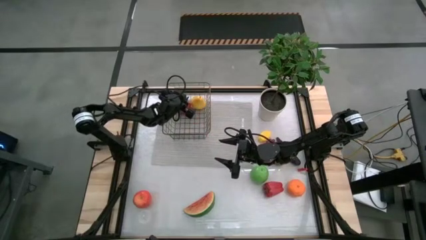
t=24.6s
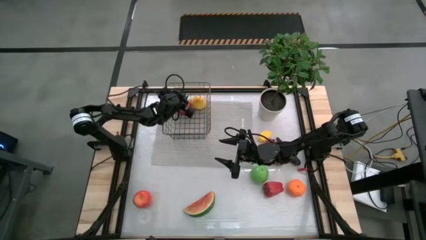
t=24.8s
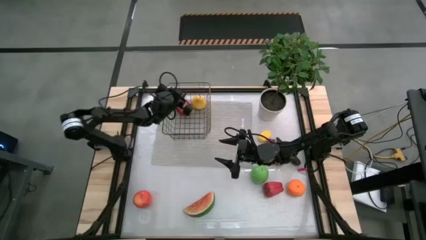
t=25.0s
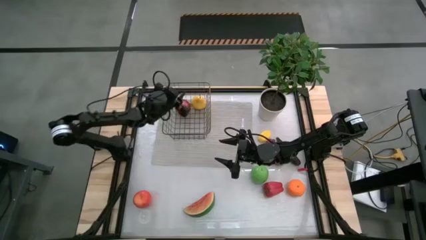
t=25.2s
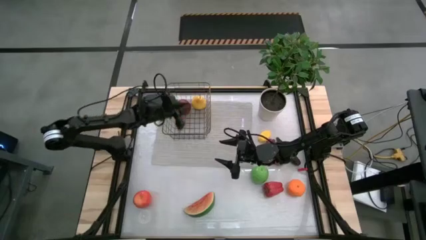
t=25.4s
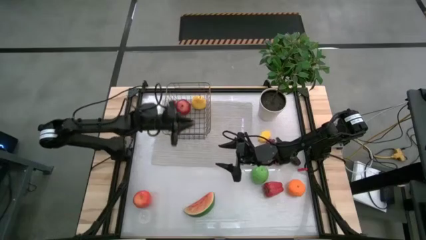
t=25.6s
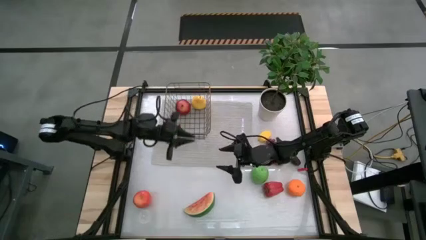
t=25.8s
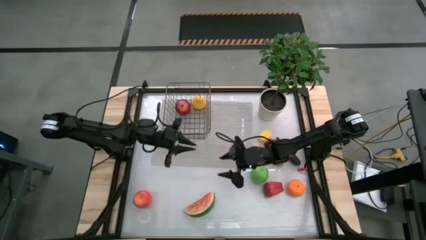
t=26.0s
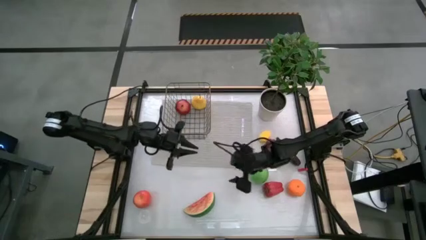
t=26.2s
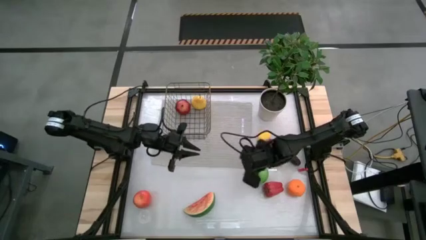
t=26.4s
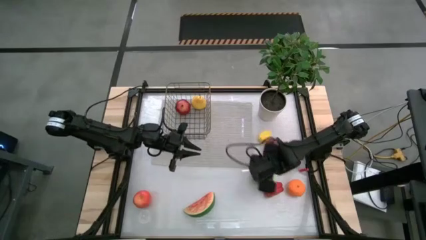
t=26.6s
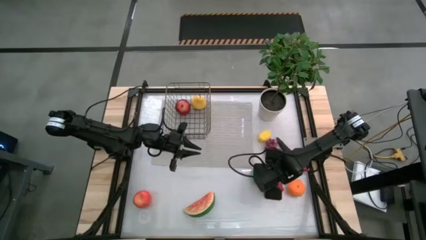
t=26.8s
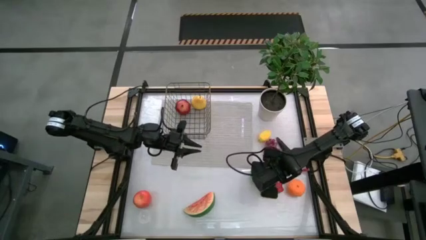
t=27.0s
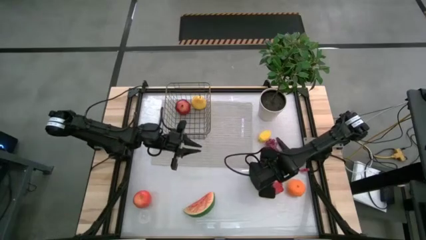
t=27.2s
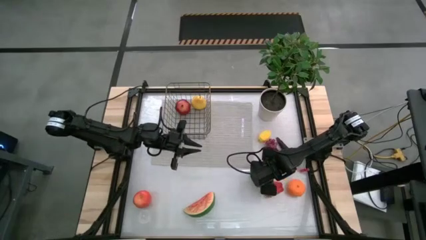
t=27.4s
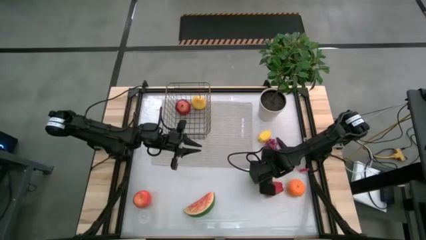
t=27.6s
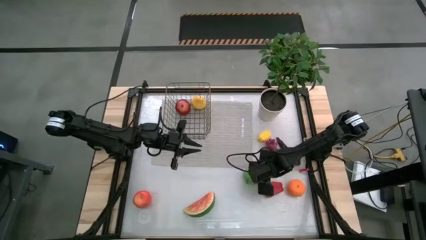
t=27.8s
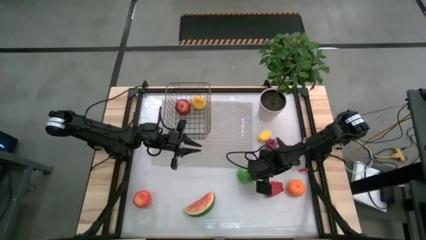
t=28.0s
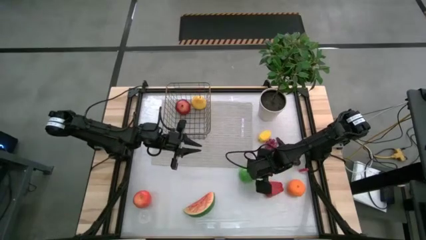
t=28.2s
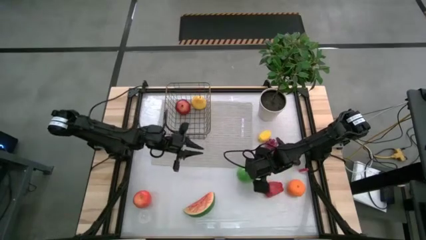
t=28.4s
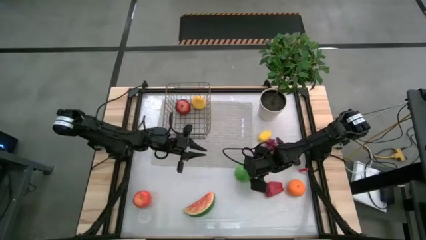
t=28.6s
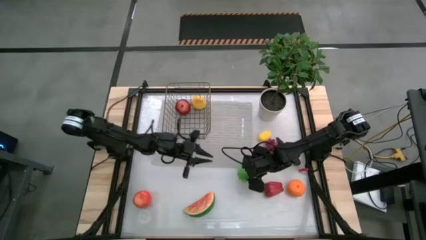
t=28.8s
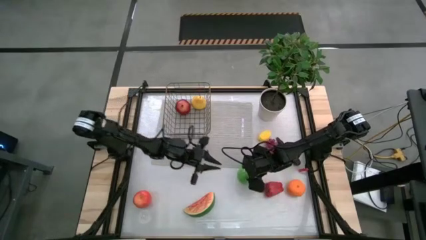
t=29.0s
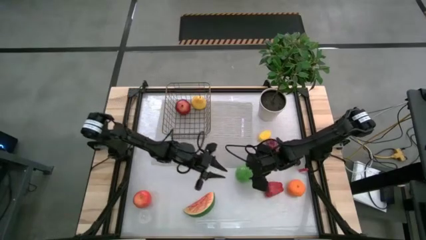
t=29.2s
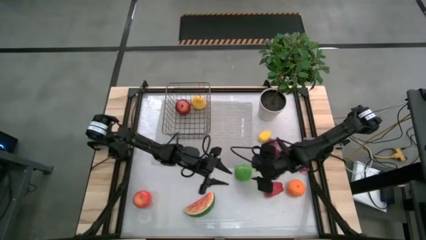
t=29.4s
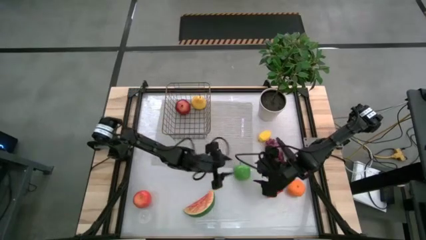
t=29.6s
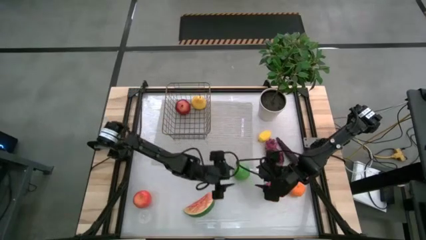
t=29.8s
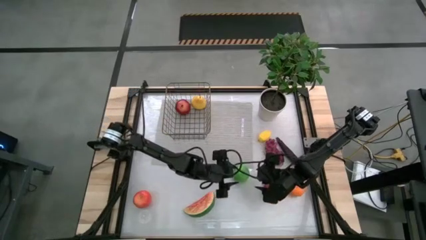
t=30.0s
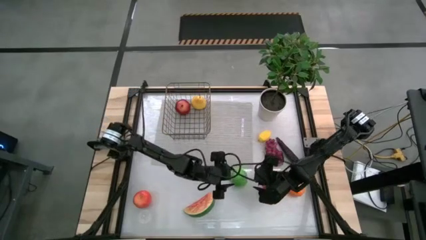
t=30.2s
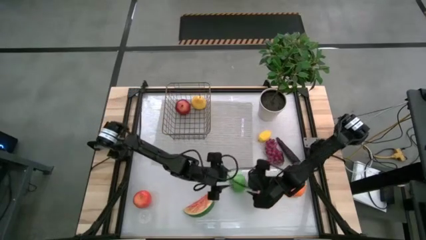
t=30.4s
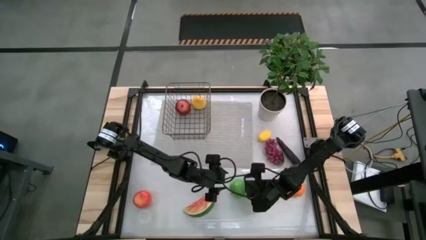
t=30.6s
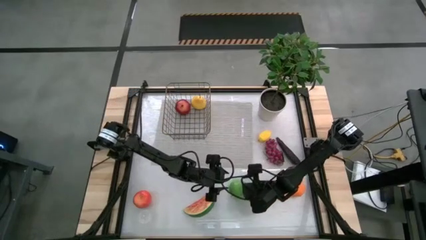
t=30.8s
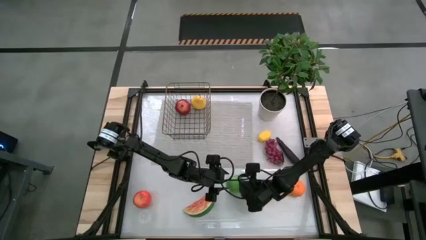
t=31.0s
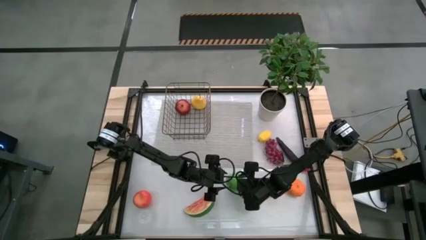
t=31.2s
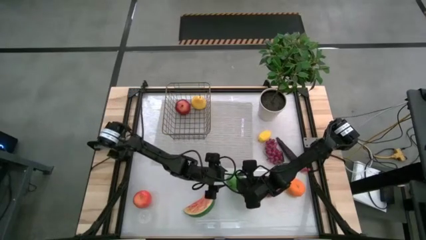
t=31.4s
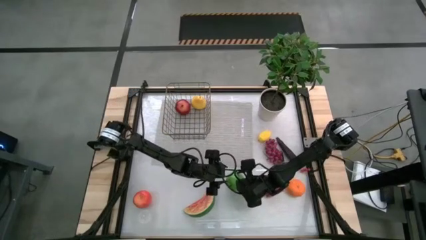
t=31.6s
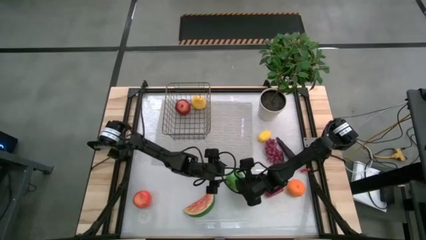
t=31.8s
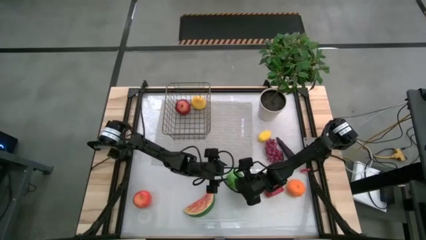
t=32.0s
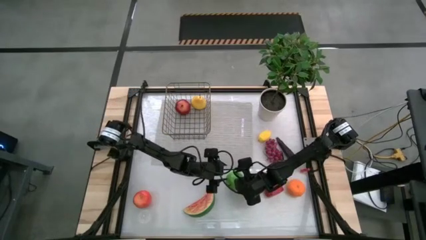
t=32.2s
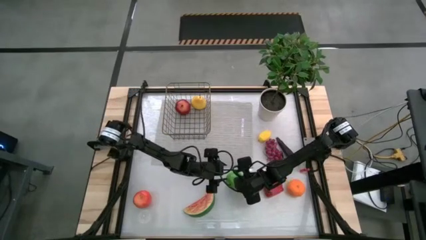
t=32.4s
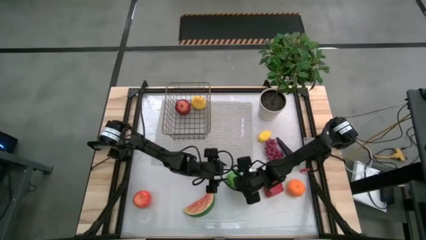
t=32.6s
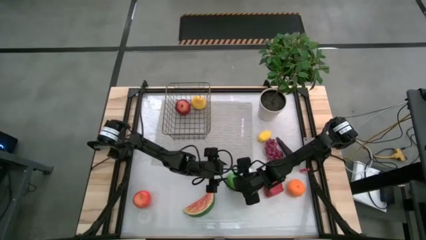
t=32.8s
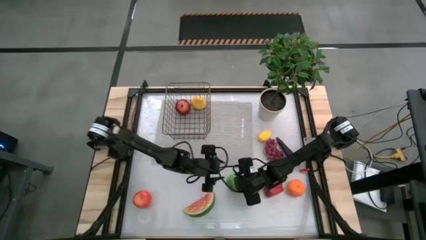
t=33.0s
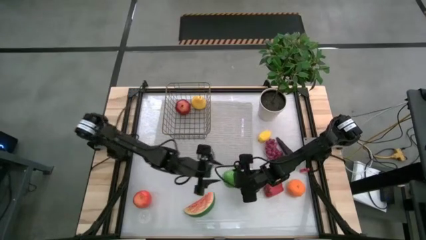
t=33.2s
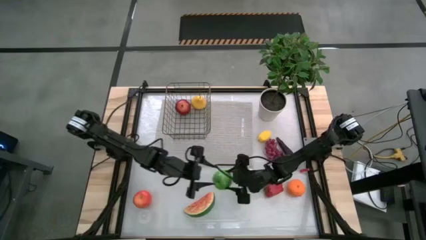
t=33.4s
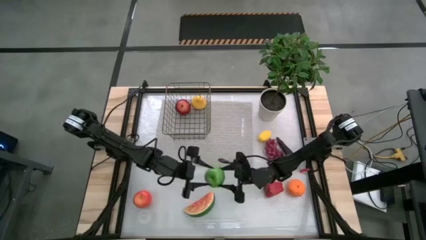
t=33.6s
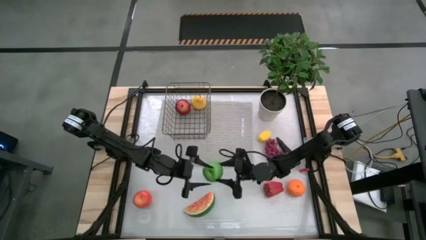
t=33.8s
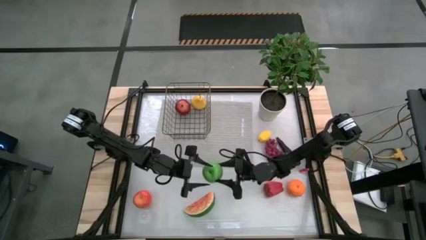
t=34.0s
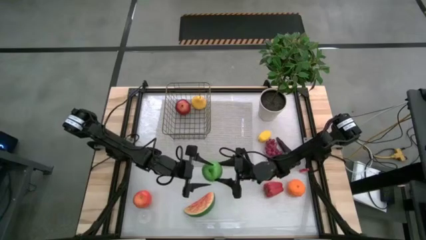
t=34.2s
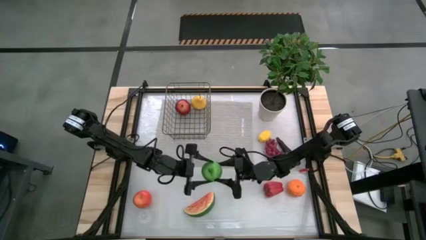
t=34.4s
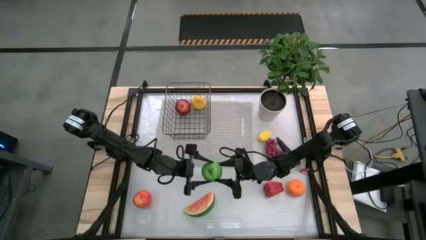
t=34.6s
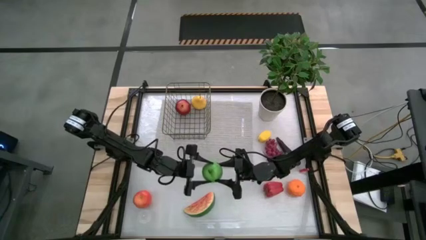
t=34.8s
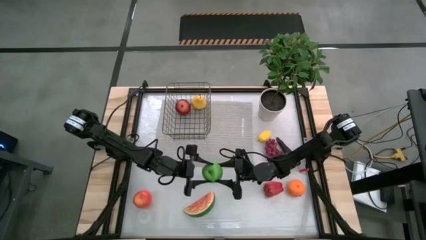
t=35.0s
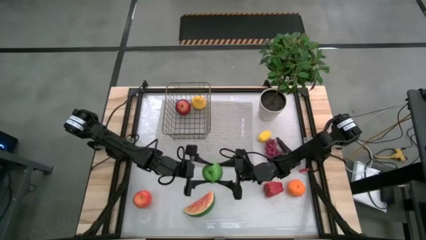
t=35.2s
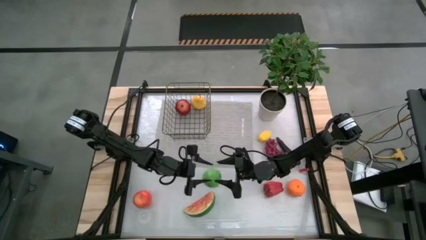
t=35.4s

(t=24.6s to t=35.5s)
Task: Build produce basket
Put the green apple into the brown wire basket
